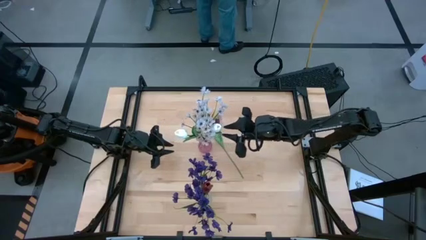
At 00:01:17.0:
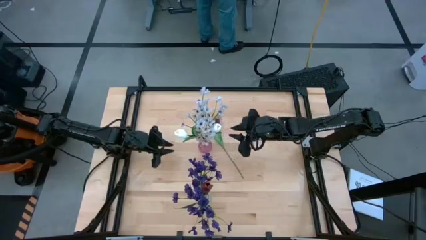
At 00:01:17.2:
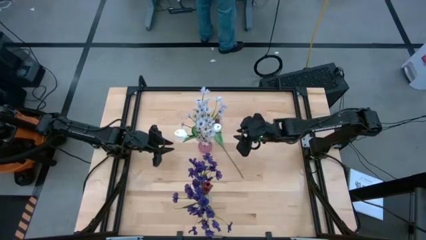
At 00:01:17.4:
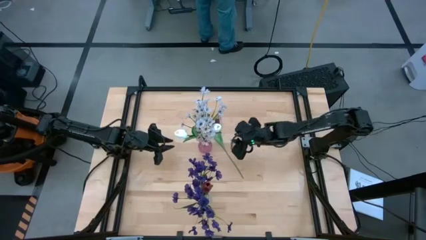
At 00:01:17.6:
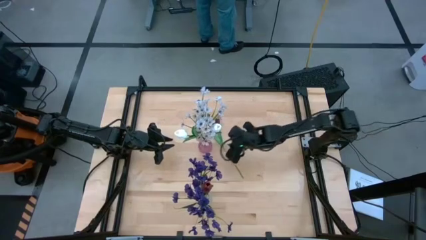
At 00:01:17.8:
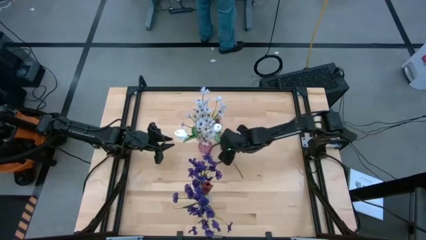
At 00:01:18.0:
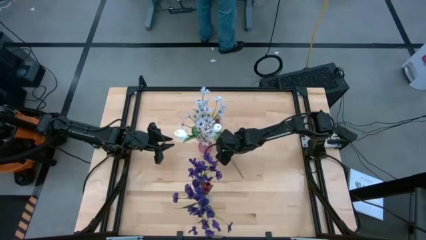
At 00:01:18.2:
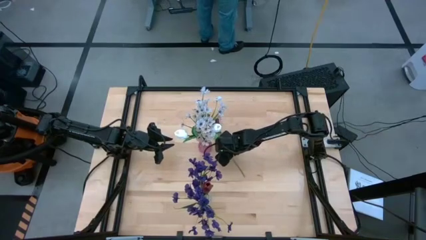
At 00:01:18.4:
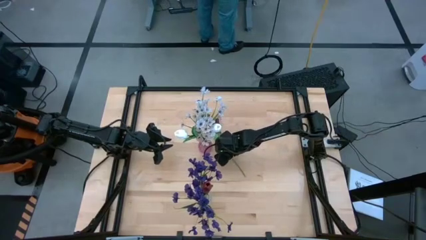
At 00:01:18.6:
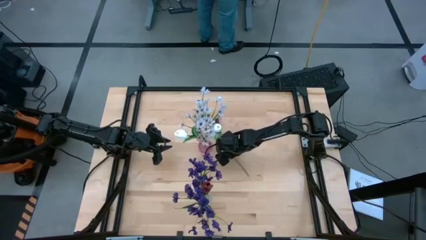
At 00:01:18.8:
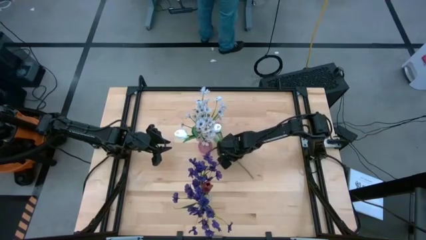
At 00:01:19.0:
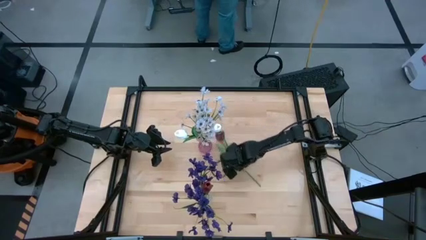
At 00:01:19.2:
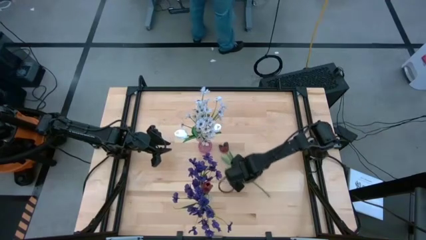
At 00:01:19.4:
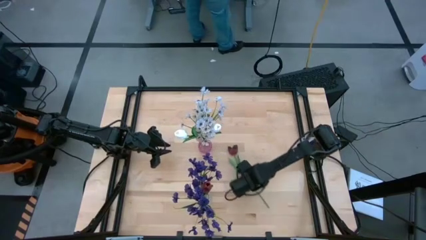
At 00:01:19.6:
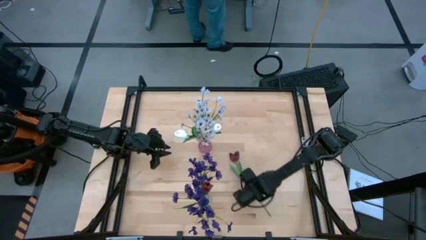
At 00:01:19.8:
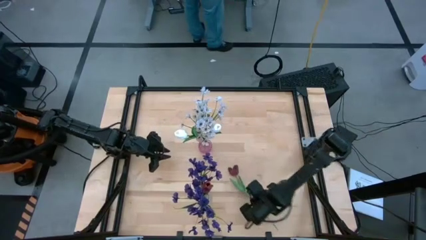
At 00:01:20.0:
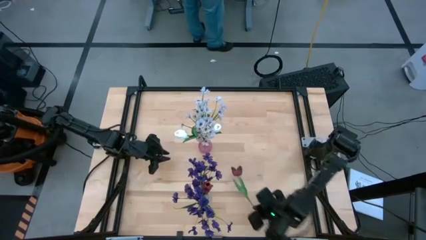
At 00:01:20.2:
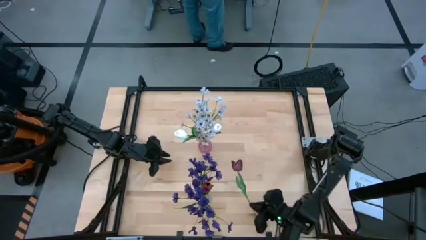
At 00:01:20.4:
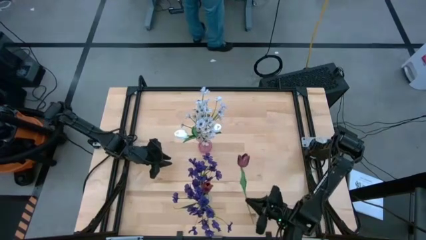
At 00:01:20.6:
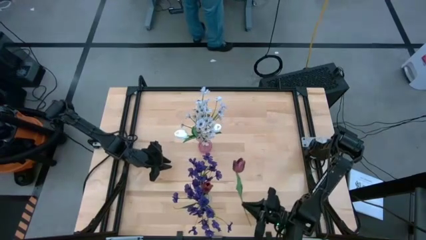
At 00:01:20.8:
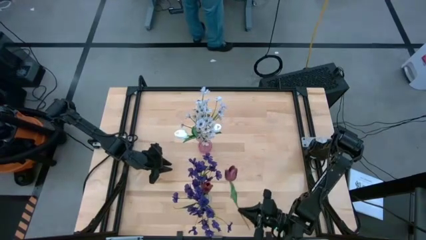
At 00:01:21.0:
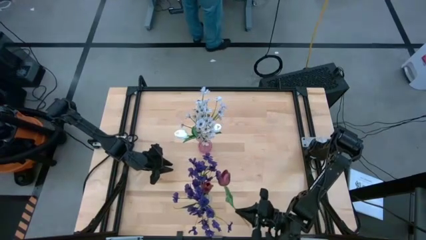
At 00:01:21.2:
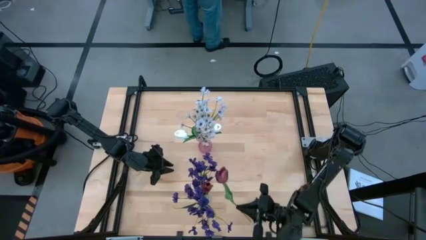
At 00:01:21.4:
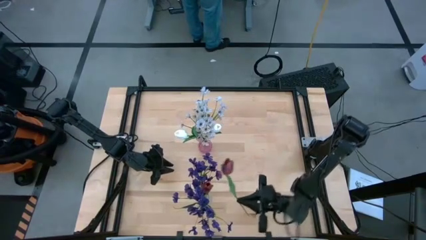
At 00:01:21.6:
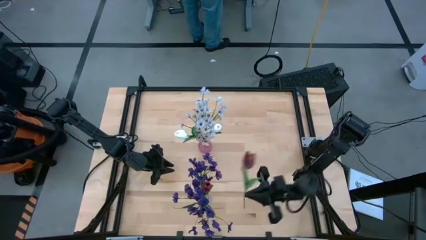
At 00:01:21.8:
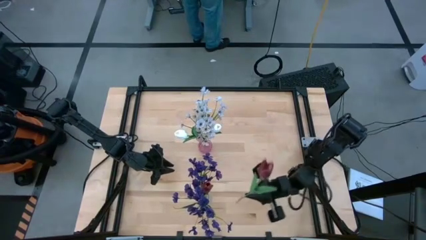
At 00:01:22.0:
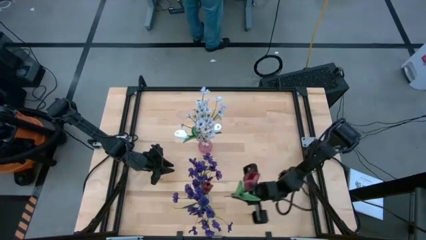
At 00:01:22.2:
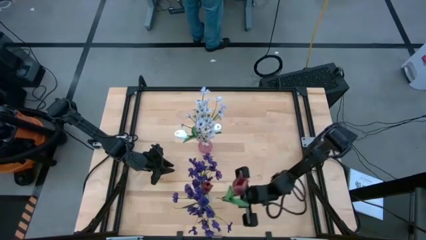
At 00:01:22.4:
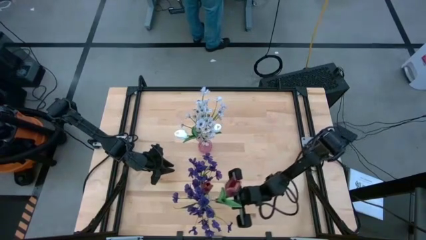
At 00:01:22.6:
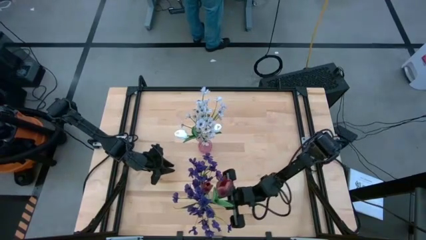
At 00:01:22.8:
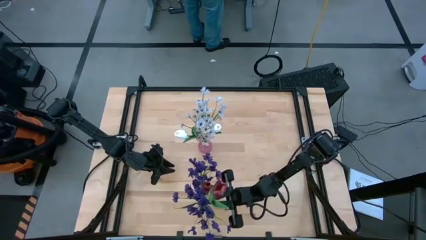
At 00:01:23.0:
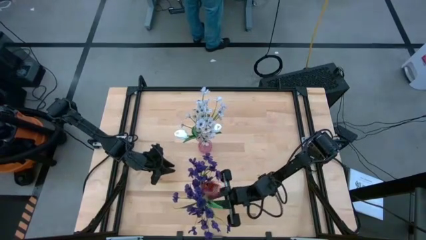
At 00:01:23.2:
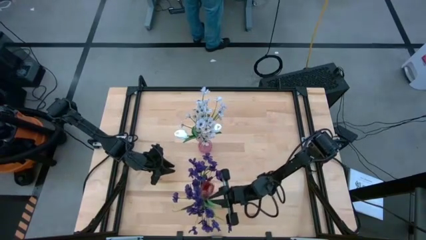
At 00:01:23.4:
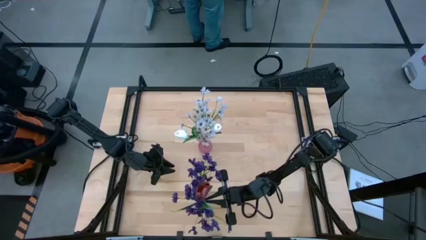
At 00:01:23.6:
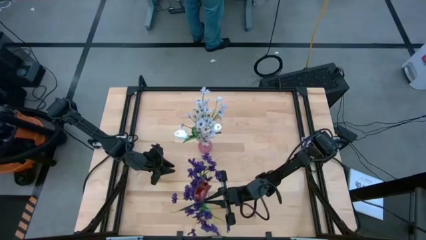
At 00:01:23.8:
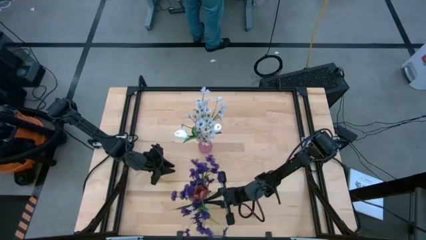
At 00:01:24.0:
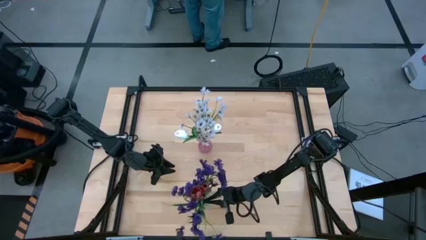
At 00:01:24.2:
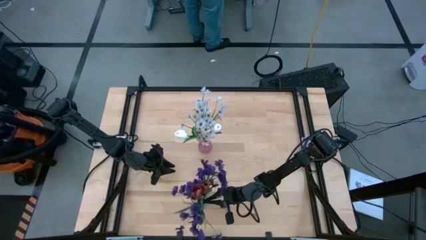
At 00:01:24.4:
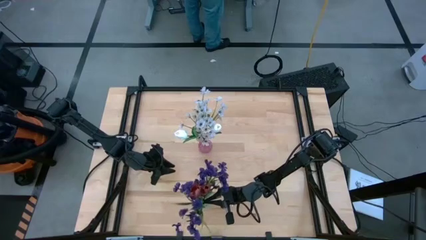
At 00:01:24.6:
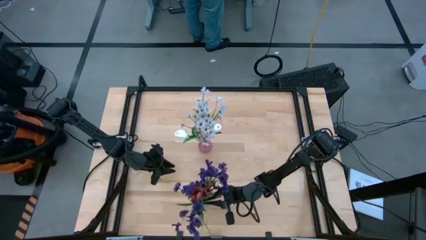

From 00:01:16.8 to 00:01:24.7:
Task: Sort flowers into vase by color
Put the red flower into the transparent vase

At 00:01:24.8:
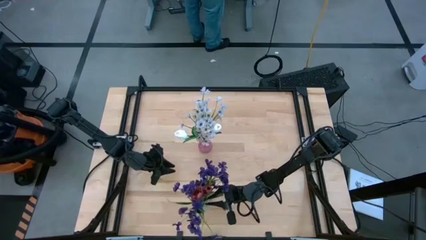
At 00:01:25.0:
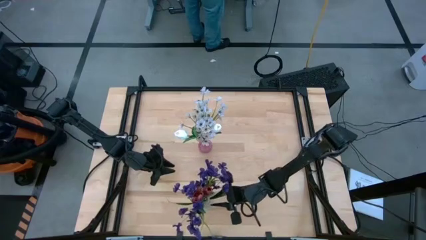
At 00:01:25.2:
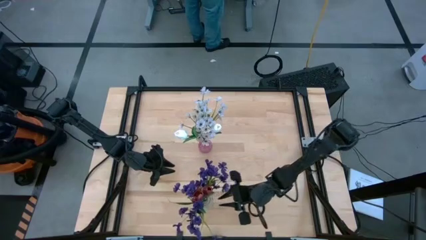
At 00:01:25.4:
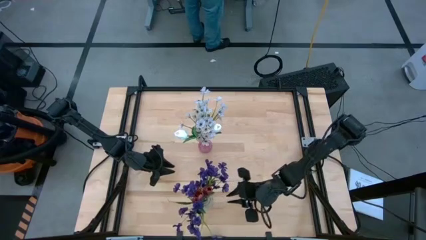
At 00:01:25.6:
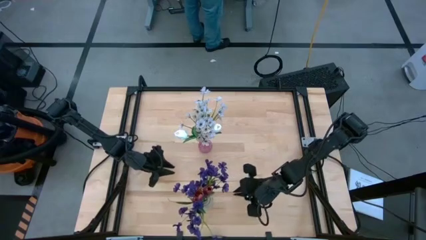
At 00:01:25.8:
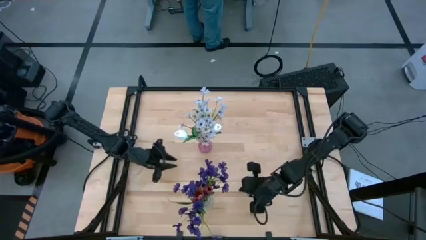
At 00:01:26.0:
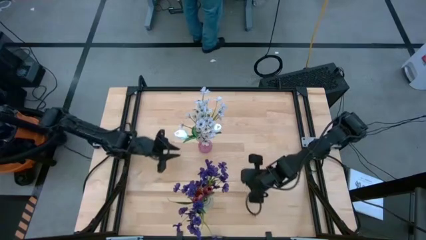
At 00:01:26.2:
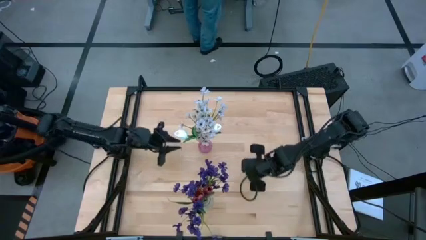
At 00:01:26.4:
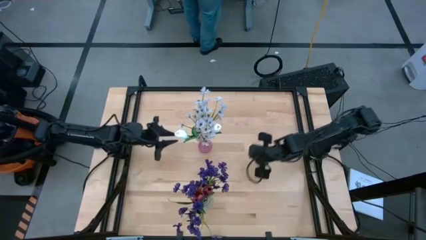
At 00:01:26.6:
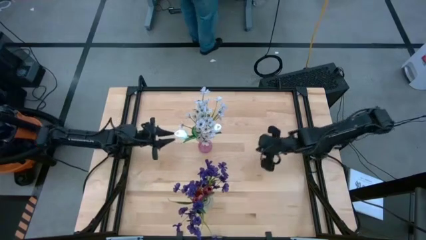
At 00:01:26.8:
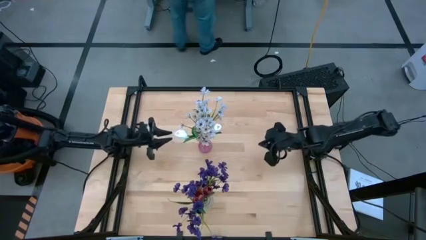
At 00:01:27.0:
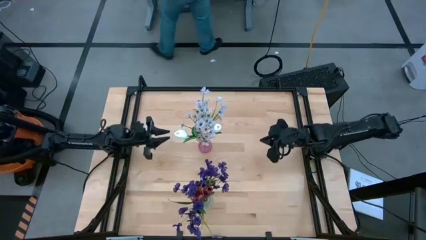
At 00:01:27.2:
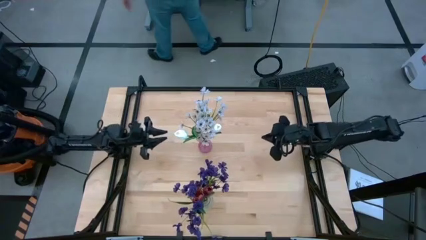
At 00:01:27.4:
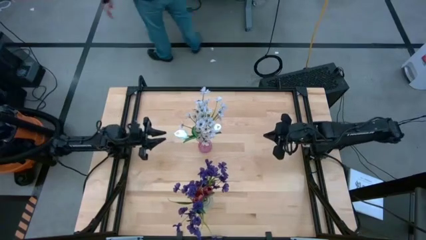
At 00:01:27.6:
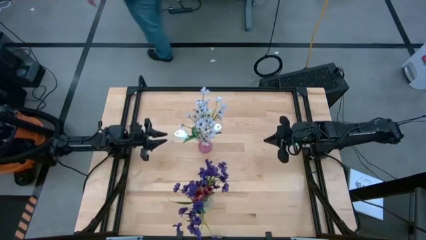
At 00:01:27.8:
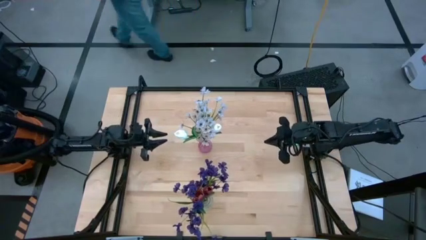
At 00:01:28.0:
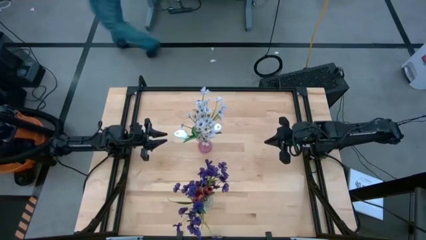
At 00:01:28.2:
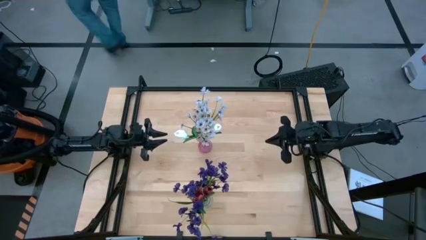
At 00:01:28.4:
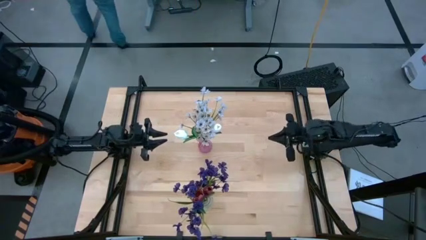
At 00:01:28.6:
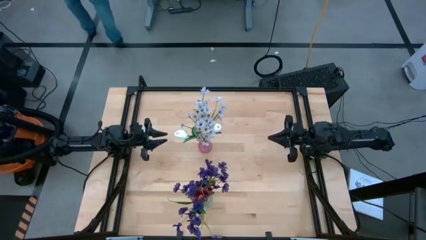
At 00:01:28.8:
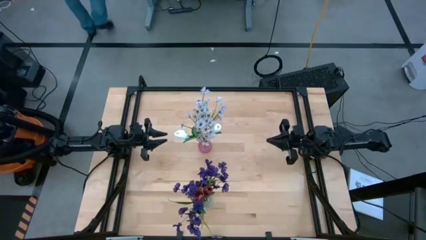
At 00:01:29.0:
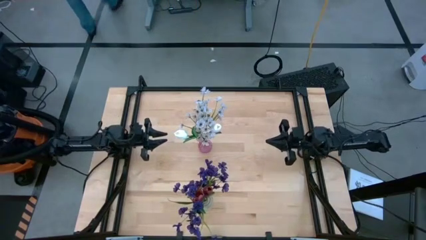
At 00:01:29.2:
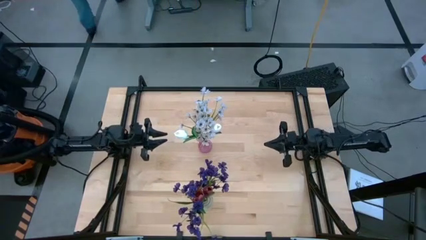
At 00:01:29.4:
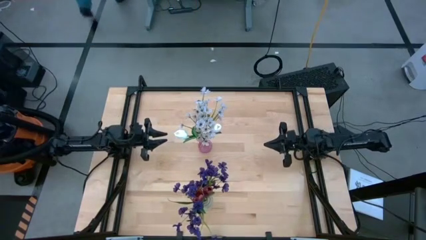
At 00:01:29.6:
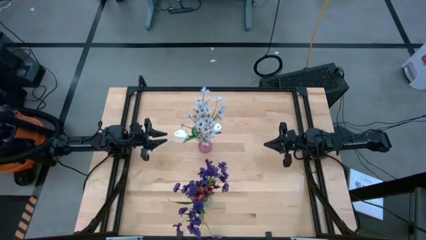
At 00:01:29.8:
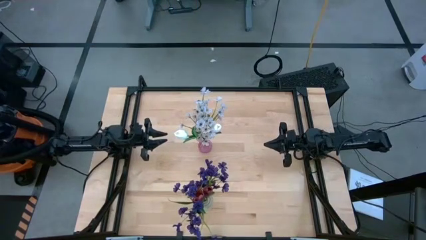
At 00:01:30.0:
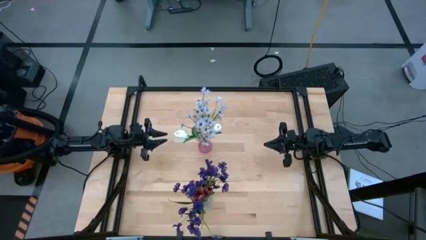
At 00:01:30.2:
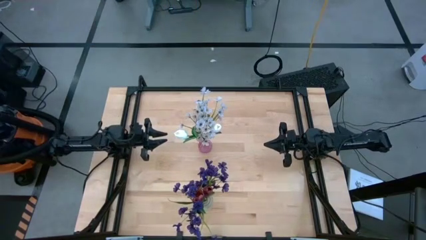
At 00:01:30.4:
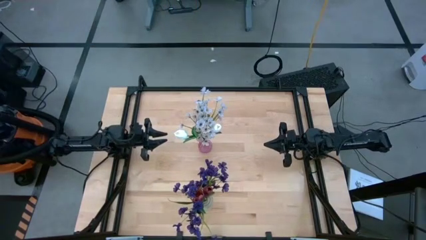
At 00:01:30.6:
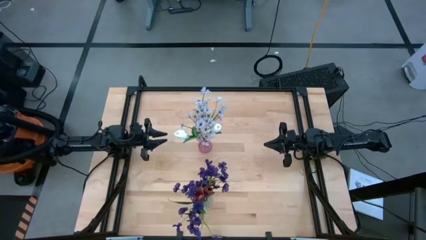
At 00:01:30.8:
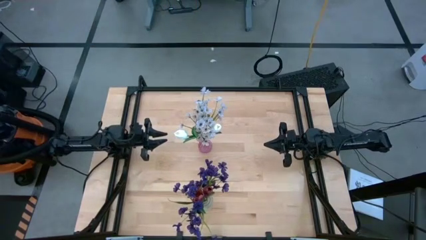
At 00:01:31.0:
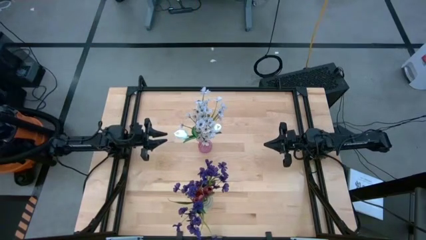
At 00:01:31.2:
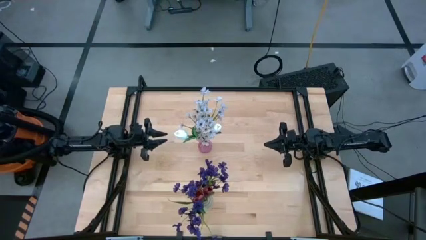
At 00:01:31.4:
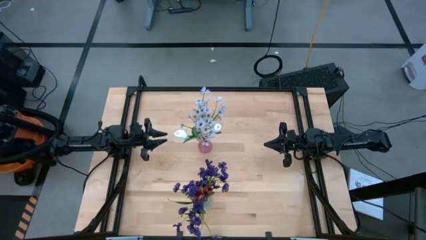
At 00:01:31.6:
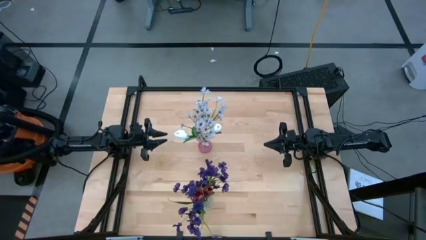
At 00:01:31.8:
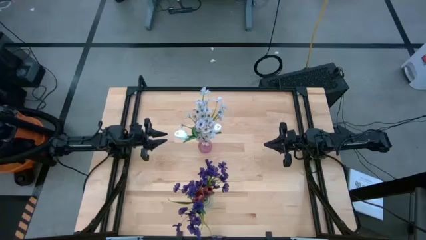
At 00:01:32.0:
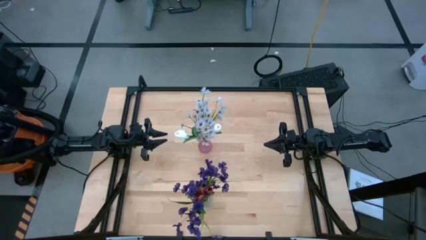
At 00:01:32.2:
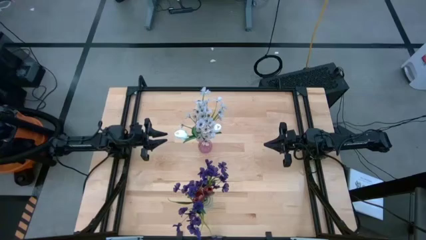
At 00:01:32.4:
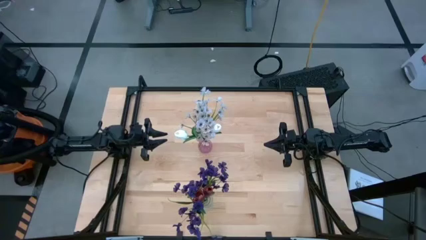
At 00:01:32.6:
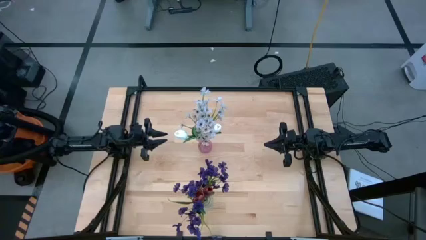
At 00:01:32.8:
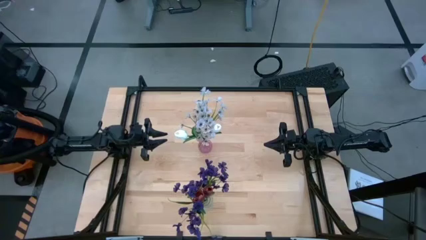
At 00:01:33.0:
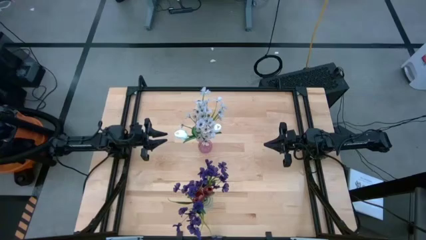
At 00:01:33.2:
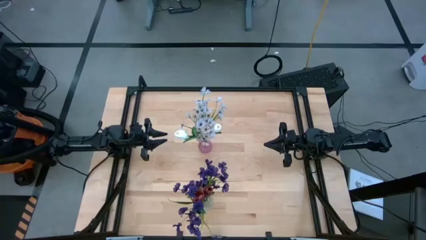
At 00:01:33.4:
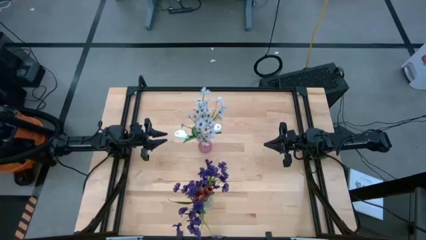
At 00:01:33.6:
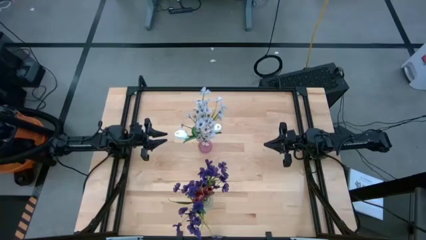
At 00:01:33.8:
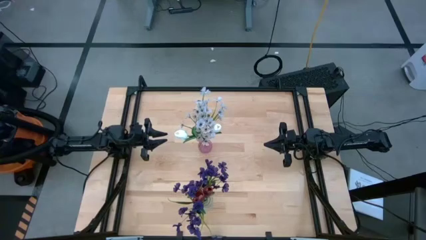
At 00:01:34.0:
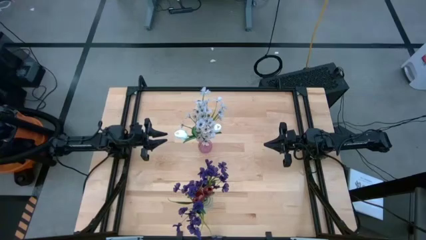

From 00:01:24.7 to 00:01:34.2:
Return to Home Position
